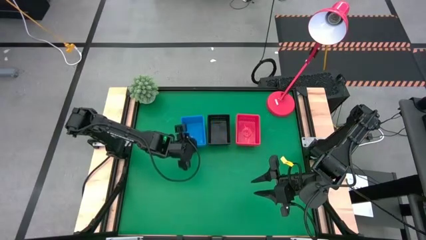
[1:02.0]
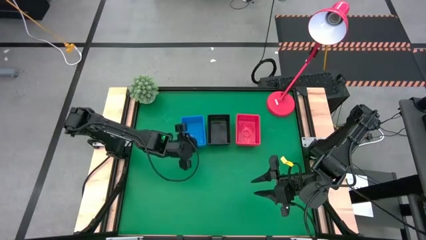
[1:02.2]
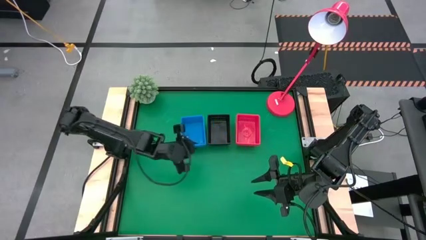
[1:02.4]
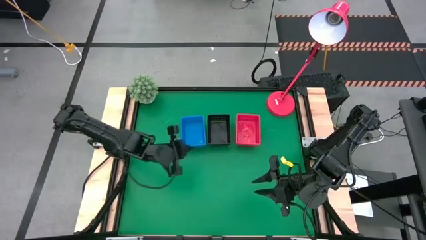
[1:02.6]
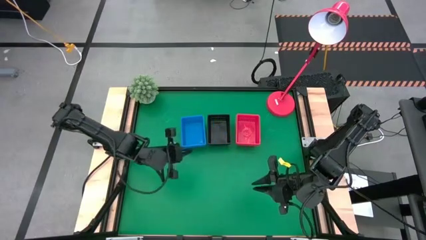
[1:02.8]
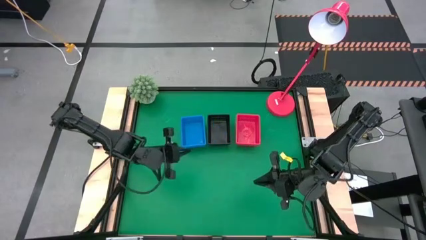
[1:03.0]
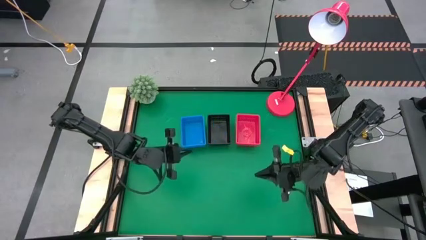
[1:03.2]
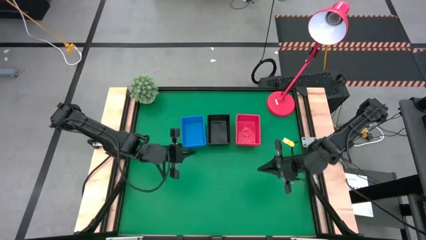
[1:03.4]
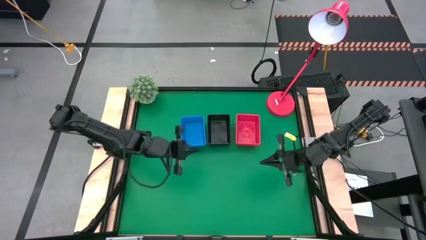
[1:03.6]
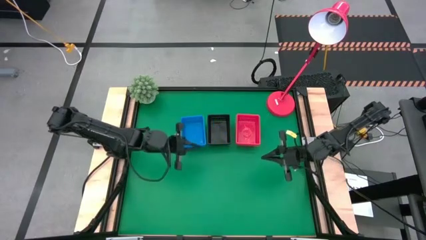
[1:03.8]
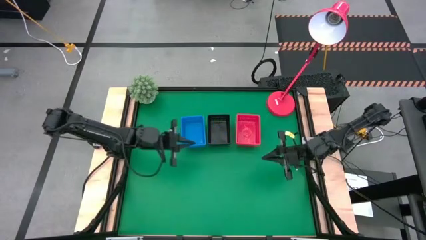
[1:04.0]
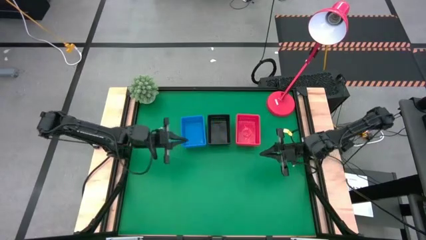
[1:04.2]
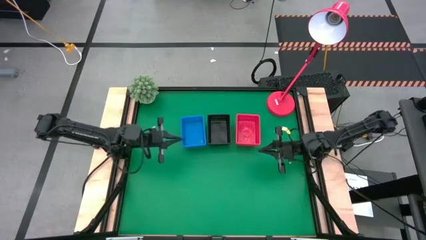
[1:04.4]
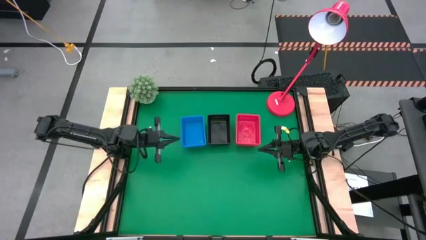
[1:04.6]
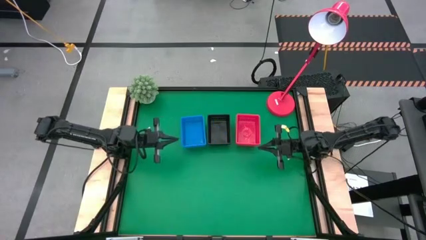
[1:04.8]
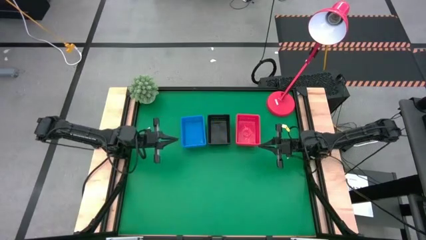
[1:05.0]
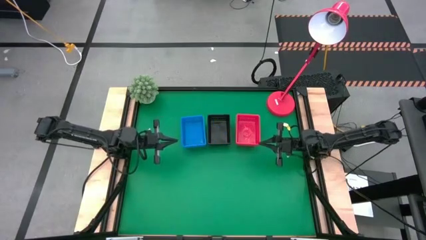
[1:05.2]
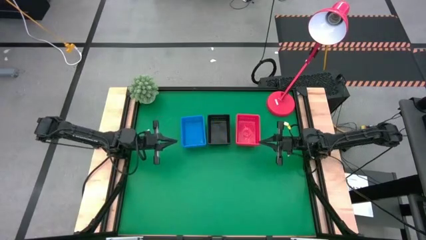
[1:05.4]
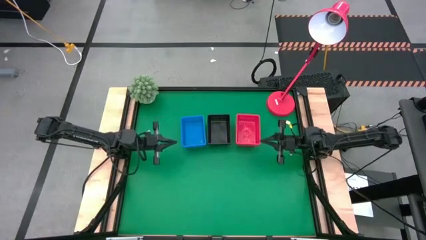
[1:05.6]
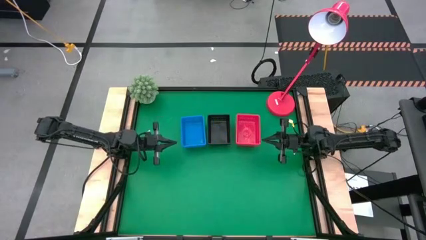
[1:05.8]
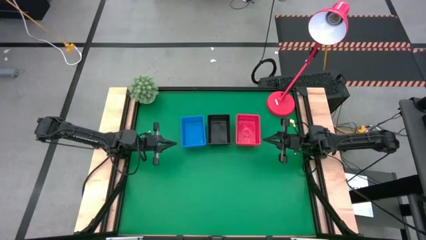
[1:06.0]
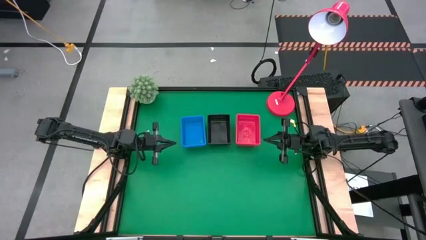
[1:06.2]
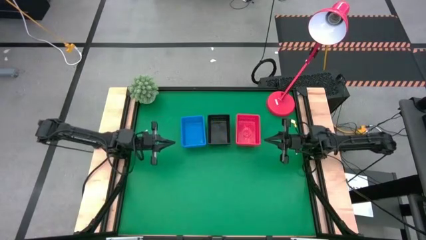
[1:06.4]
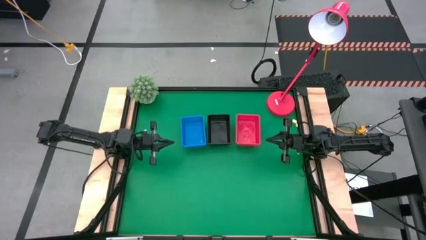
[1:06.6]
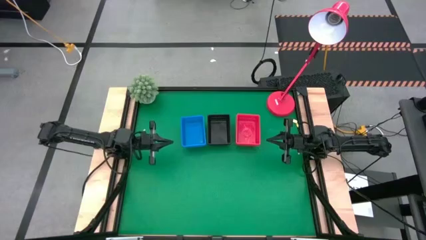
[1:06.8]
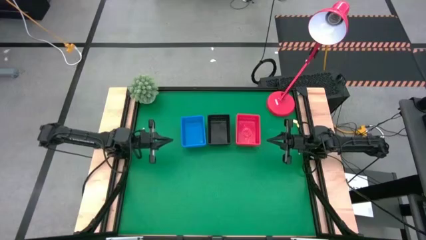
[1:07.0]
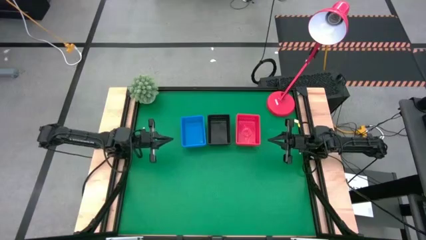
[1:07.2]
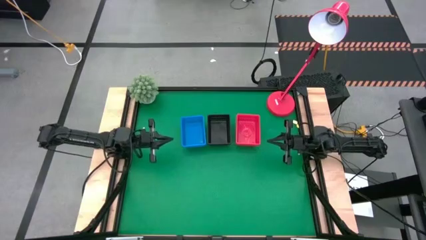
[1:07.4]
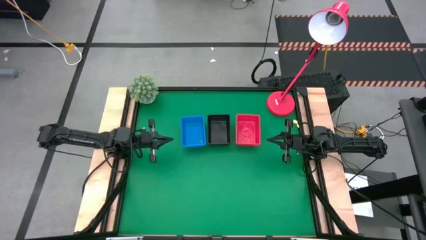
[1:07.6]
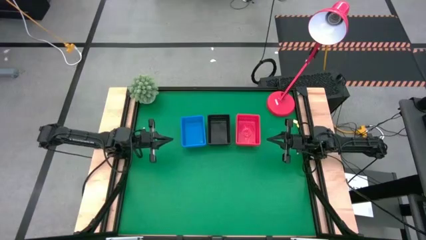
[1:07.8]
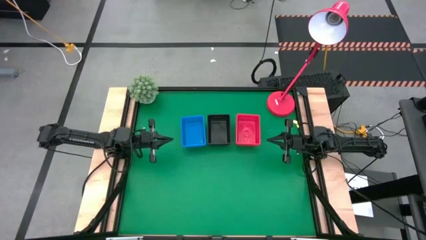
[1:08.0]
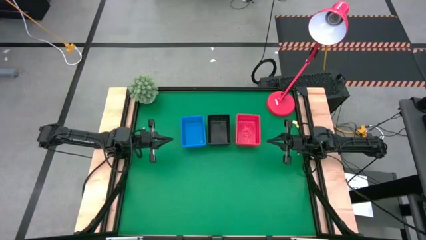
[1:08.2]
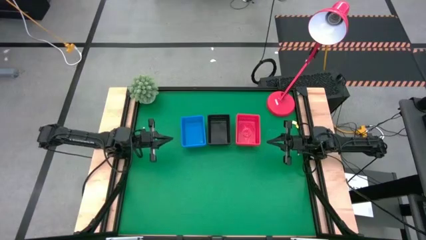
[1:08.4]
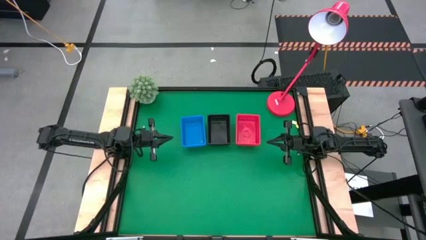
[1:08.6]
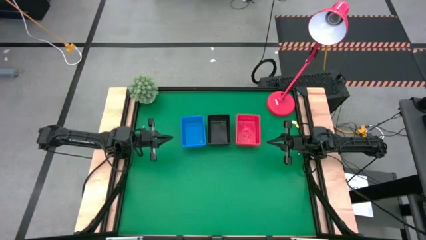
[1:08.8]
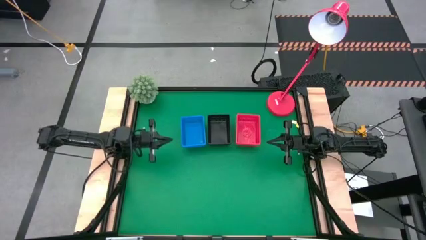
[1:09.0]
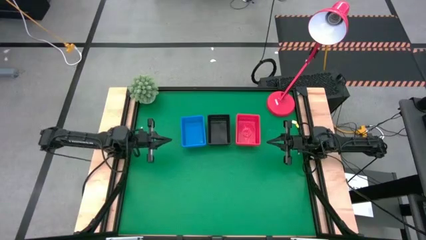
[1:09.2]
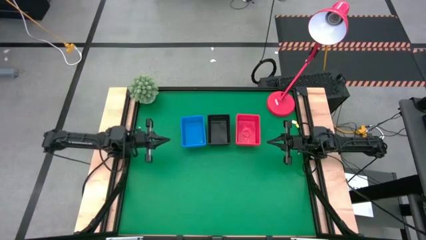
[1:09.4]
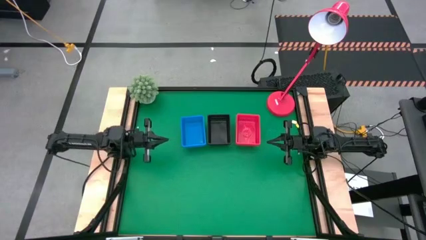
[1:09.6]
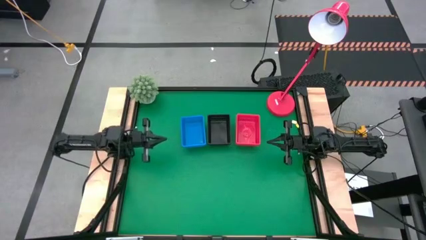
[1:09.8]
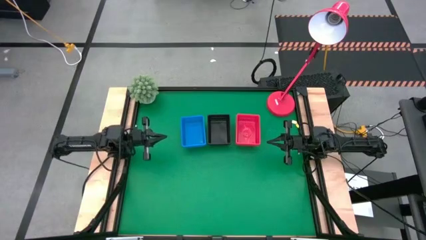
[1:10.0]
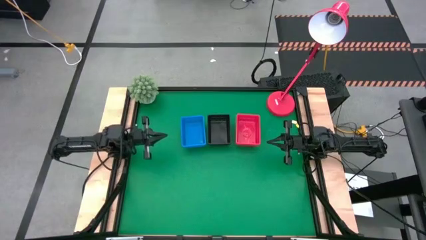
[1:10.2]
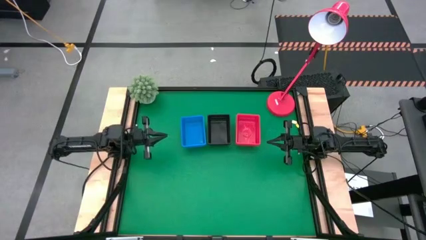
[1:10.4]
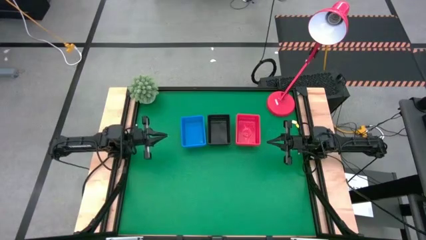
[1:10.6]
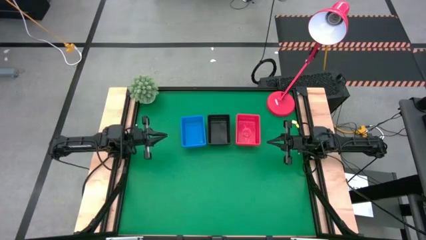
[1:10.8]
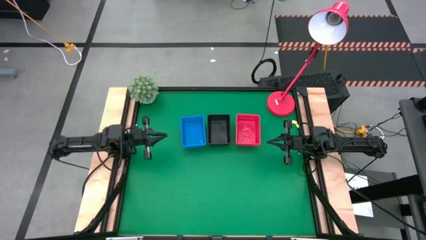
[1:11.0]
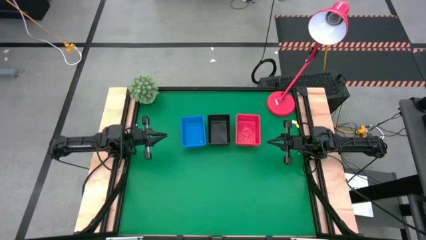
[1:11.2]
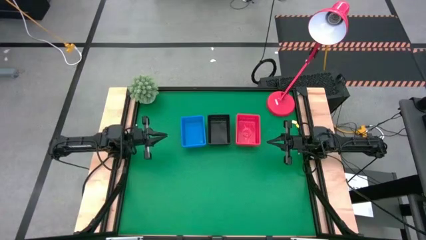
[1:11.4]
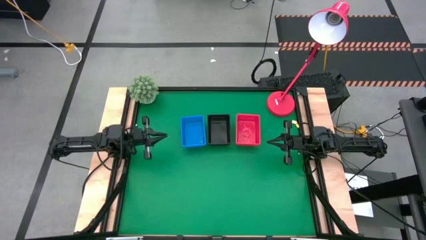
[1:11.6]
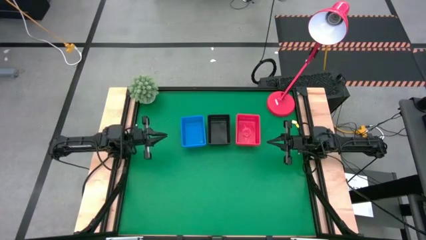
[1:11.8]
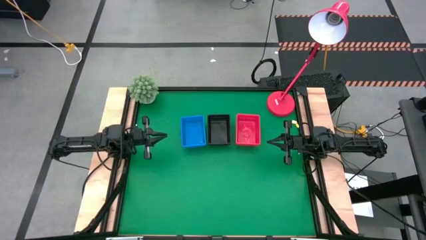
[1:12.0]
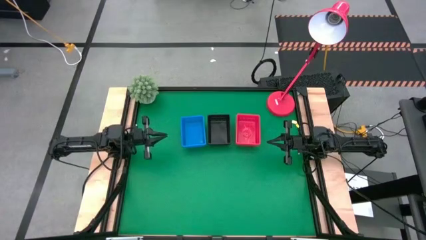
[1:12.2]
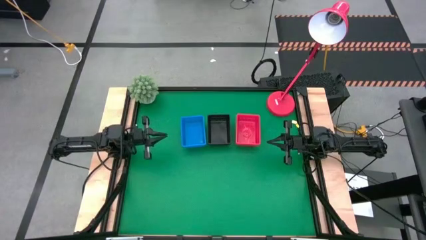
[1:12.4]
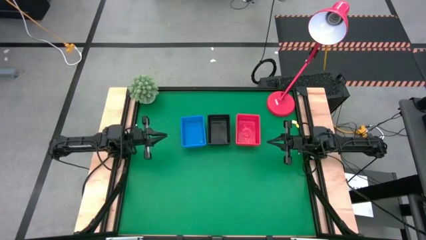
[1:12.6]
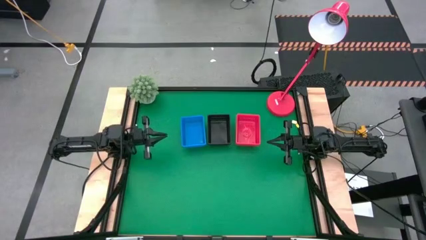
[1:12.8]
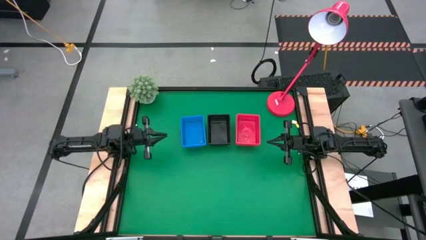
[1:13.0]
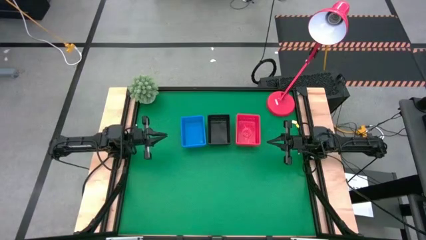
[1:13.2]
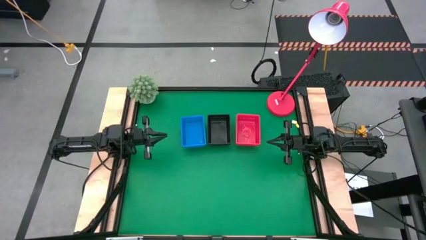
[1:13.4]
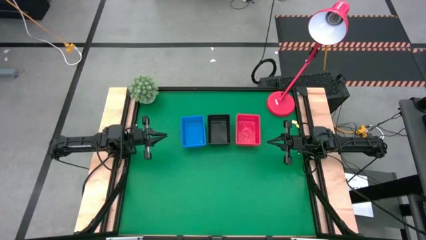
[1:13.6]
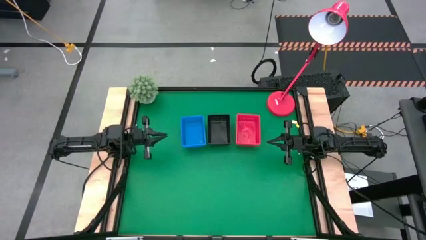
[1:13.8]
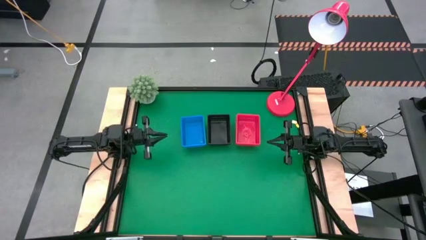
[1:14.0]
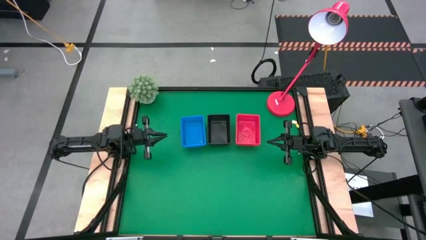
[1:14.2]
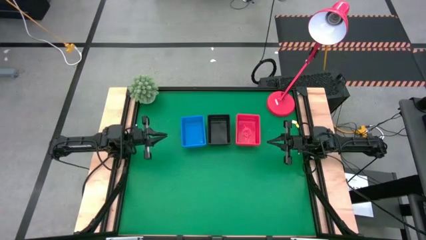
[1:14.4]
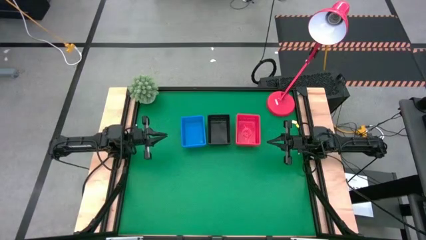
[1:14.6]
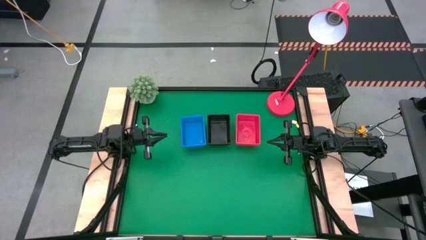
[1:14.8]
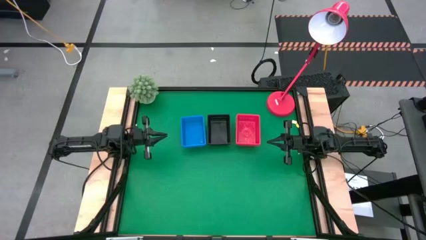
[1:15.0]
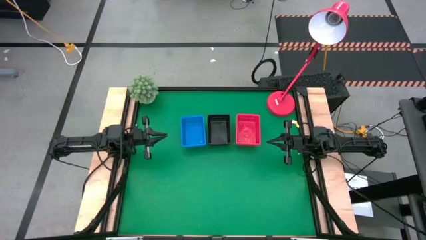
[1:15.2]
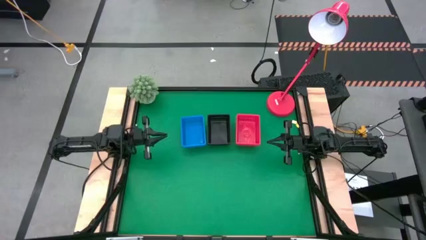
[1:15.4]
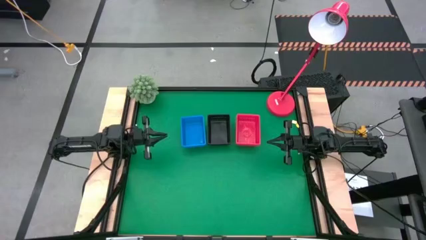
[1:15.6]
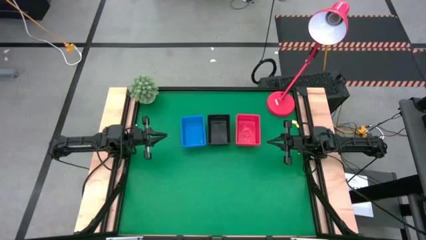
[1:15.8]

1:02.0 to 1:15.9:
Return to Home Position
